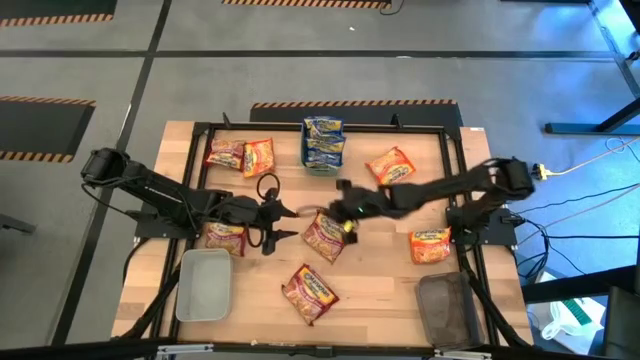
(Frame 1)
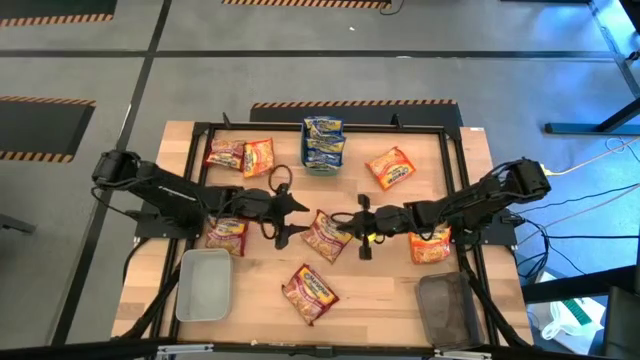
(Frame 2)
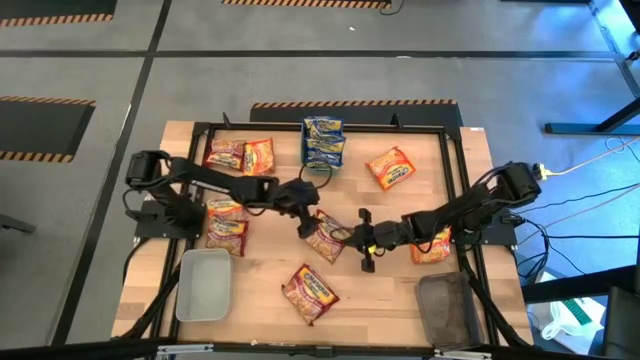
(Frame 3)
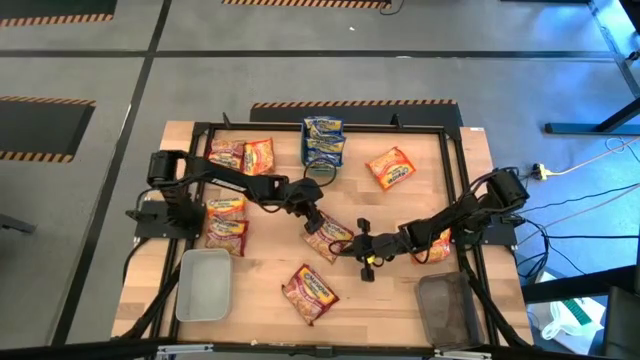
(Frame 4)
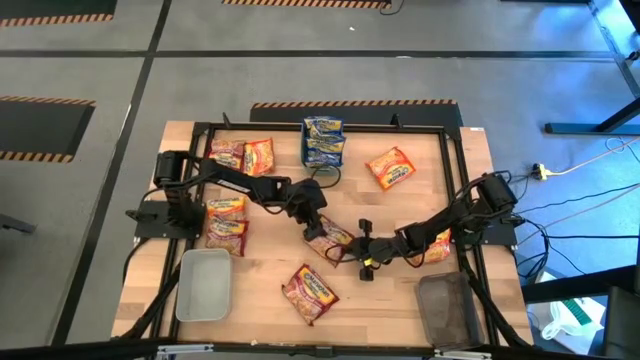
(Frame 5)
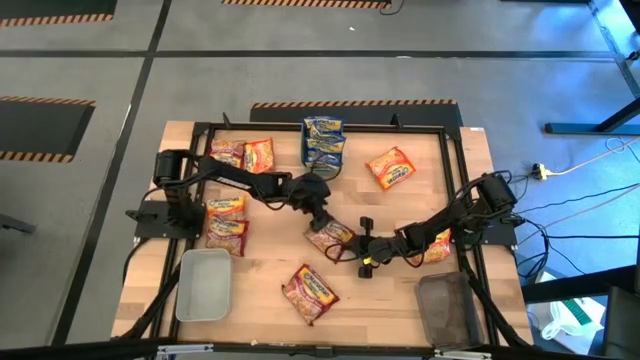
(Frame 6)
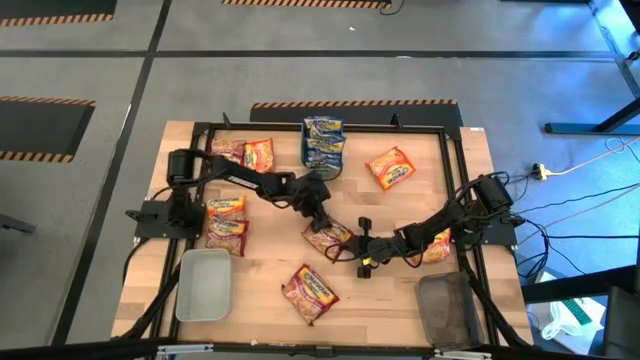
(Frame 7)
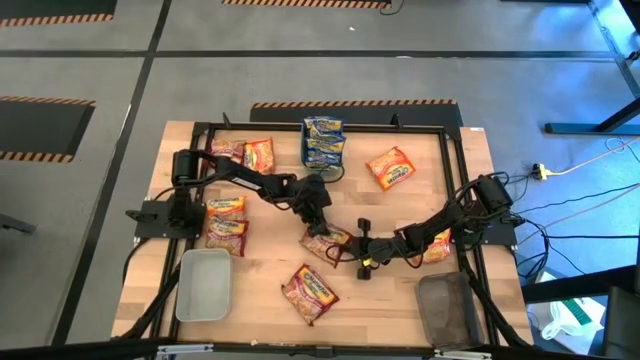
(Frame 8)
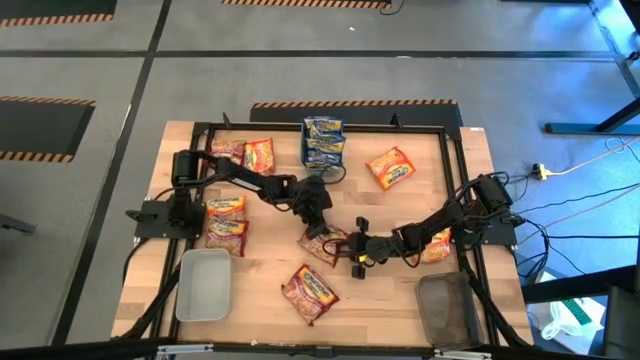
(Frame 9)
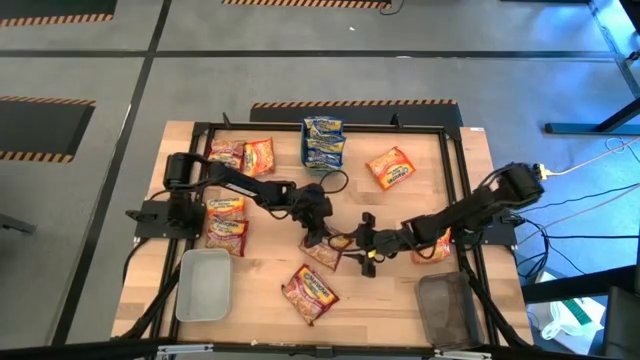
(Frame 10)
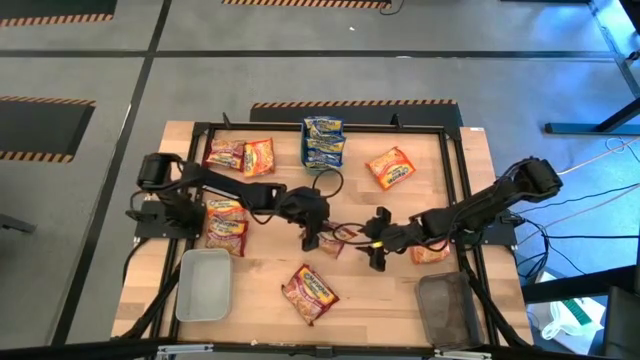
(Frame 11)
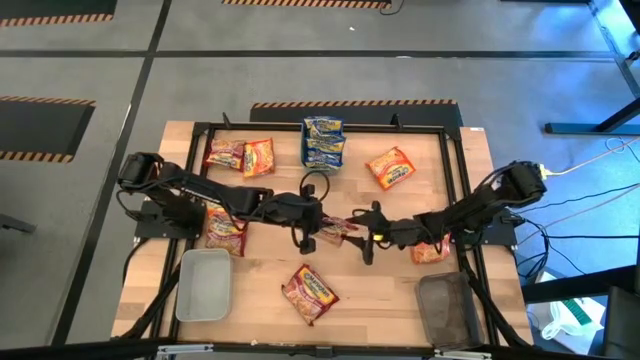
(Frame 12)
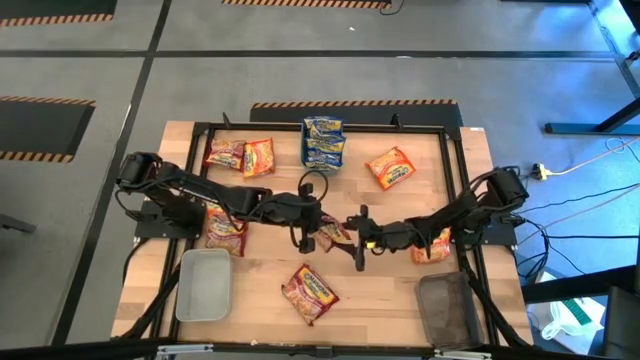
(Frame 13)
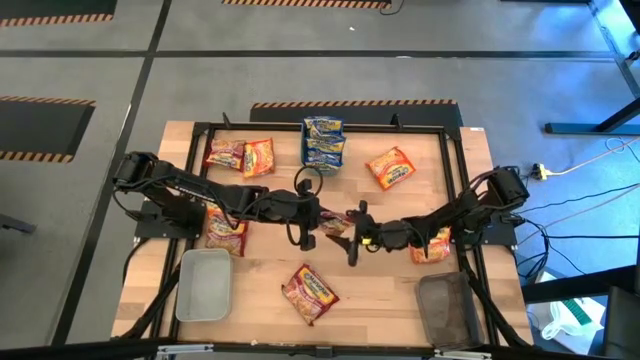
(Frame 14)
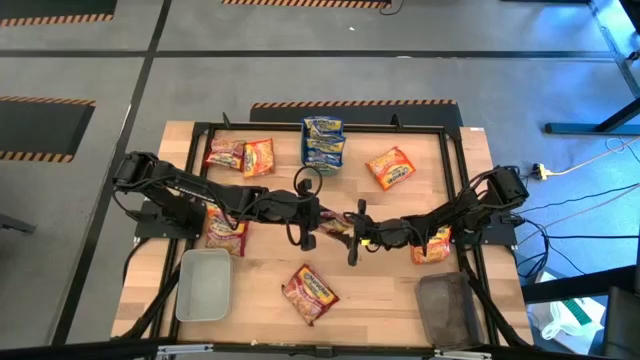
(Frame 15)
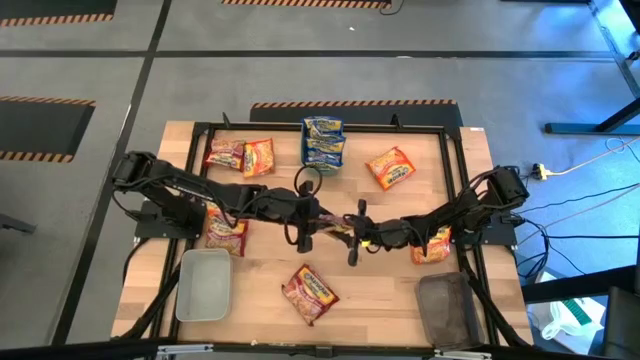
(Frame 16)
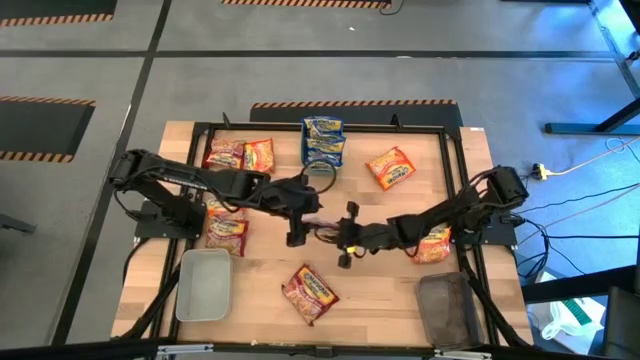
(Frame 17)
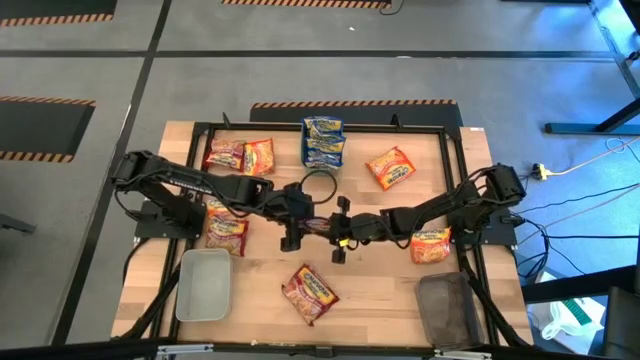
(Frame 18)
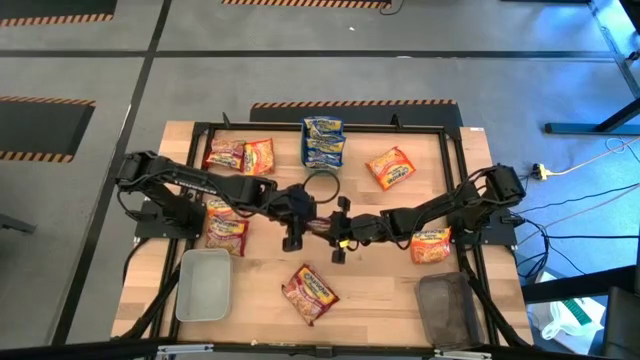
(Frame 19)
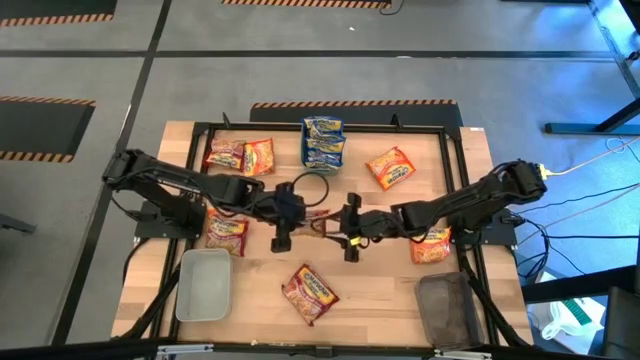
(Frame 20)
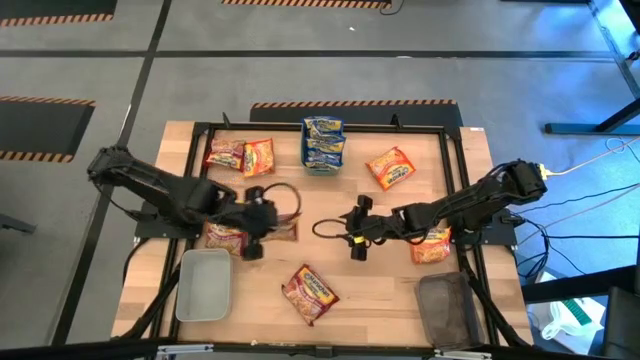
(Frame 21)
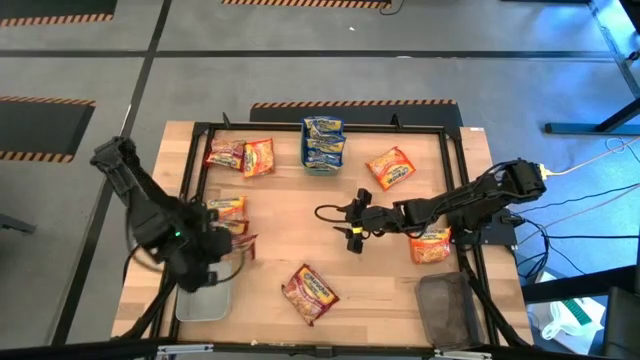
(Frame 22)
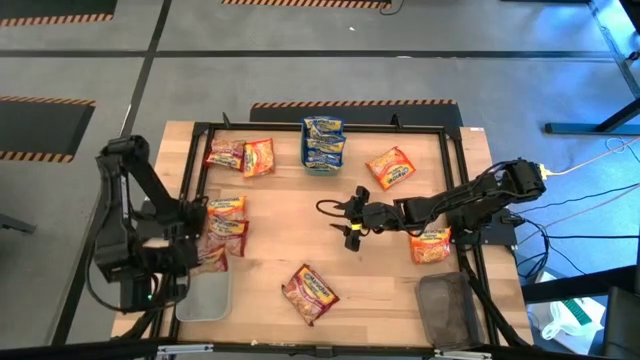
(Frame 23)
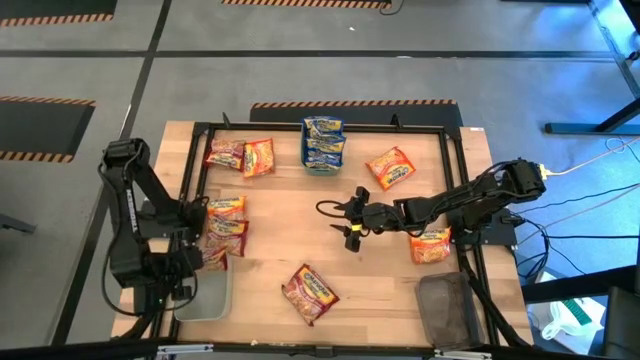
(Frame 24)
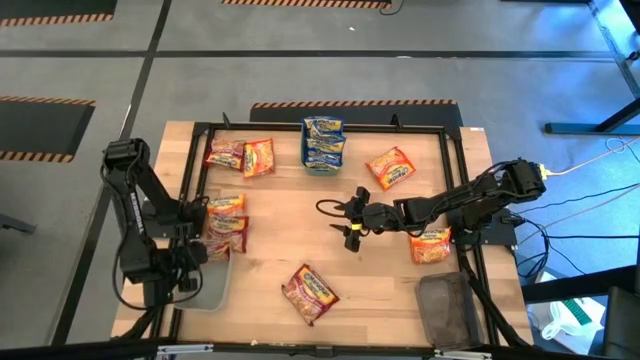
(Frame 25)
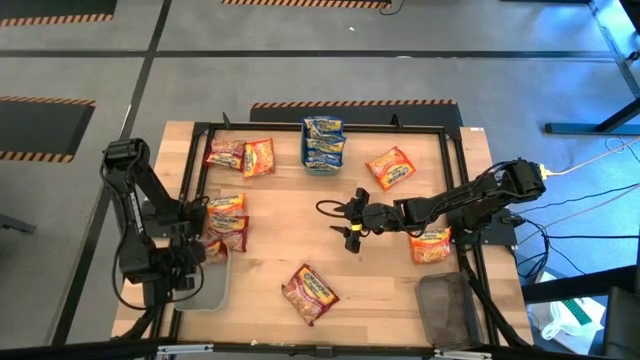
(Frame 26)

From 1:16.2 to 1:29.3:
Task: Sort Maruchan noodles
Put the red noodle pack into the gray bin

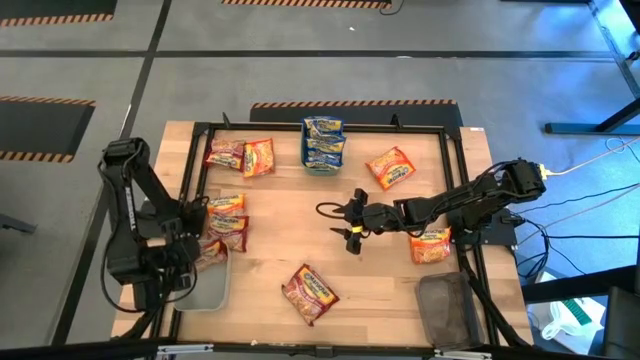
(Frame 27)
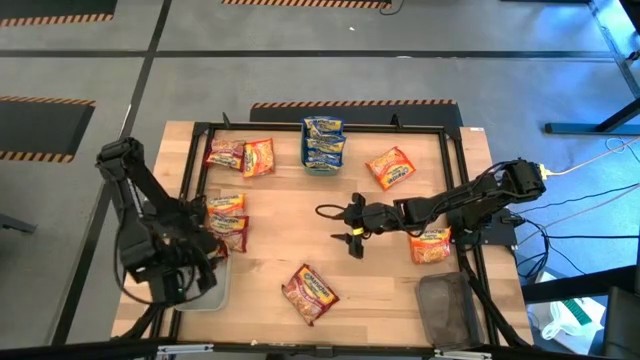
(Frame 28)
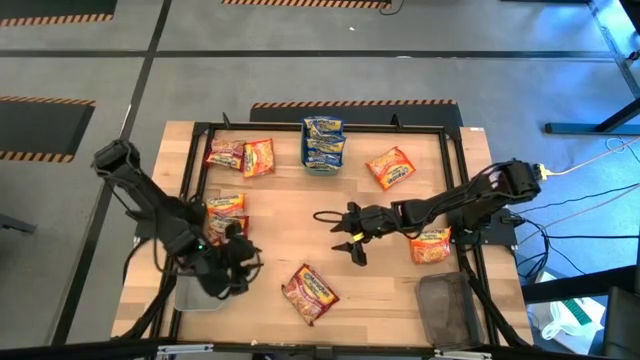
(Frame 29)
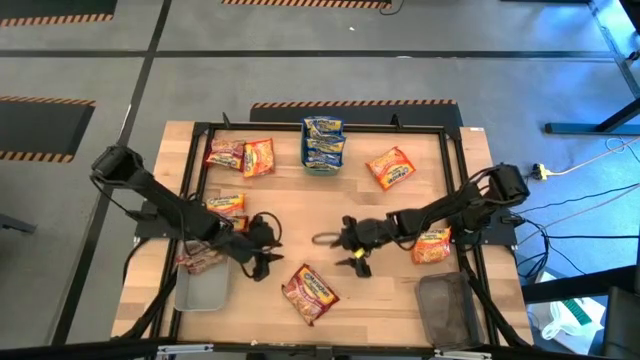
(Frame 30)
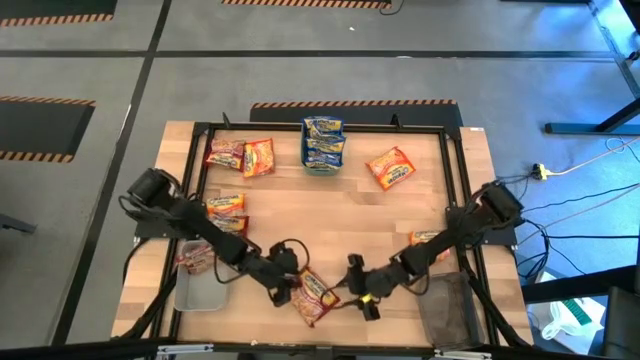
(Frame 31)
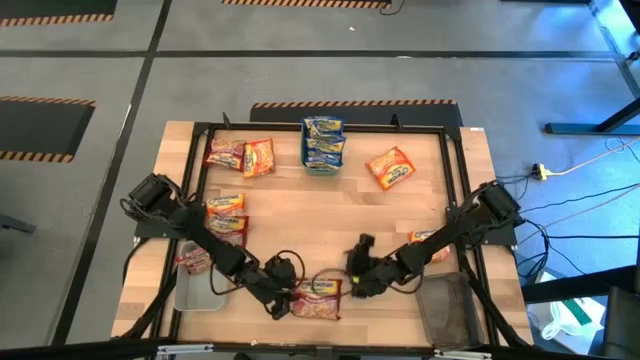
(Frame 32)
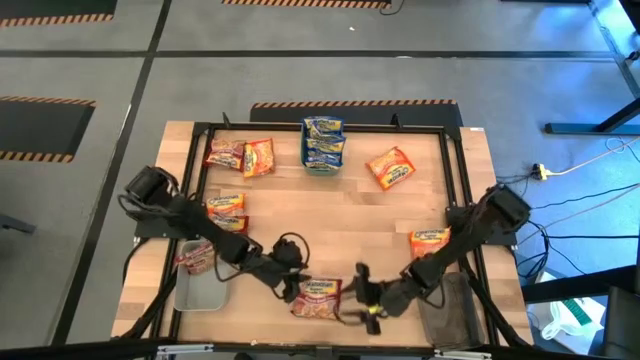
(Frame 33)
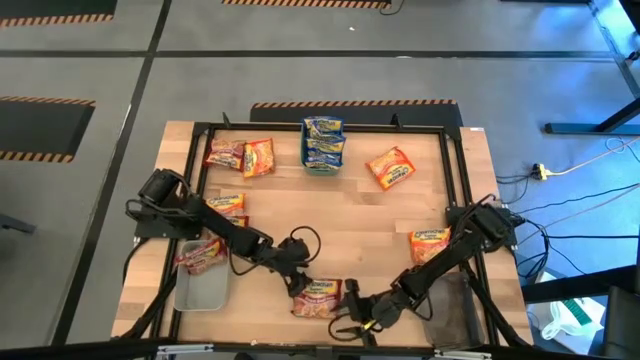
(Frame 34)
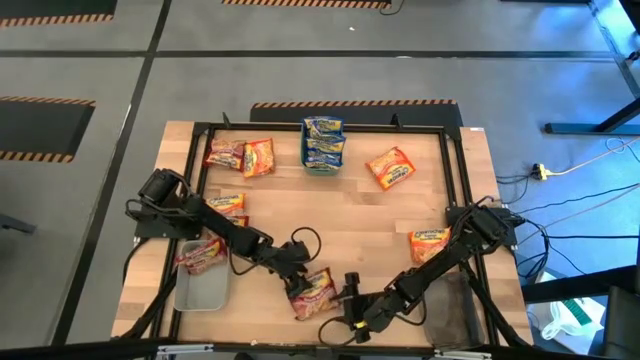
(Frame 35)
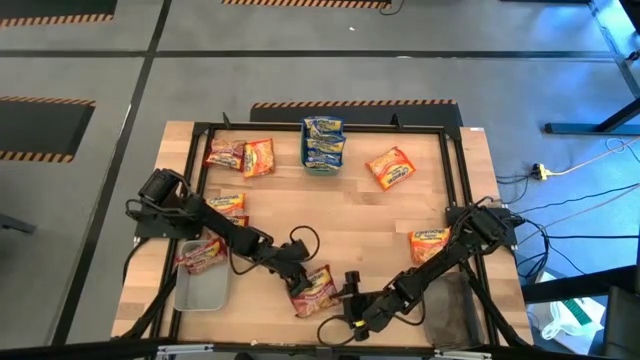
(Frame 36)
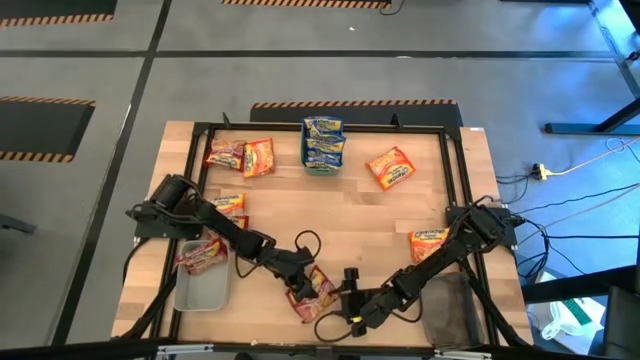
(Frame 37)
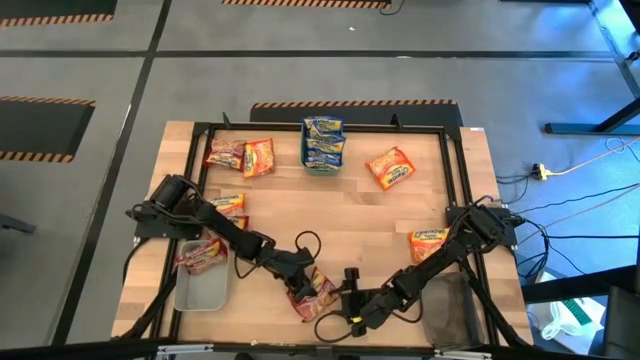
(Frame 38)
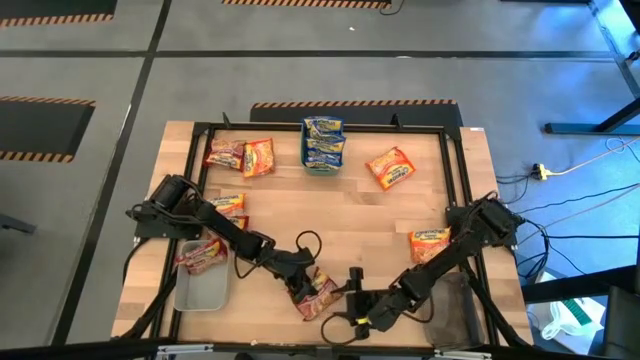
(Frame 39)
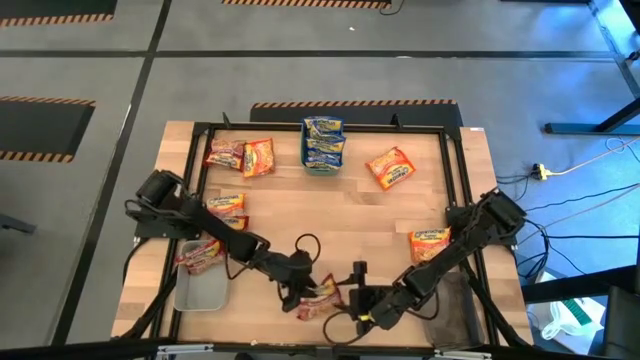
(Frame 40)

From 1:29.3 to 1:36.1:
Put the red noodle pack into the gray bin
